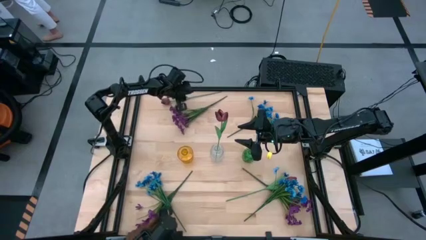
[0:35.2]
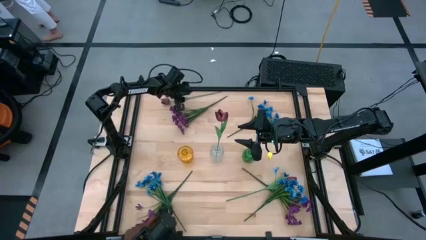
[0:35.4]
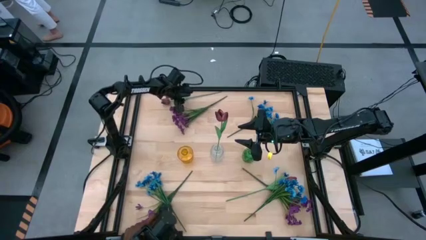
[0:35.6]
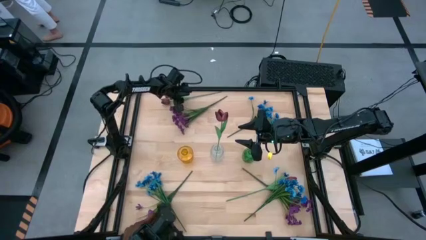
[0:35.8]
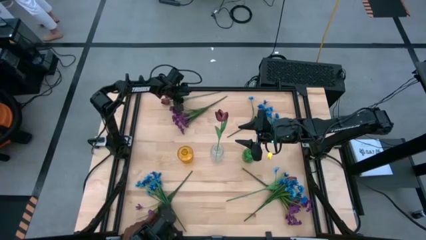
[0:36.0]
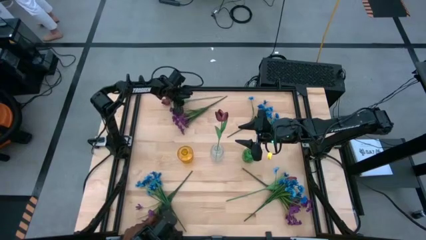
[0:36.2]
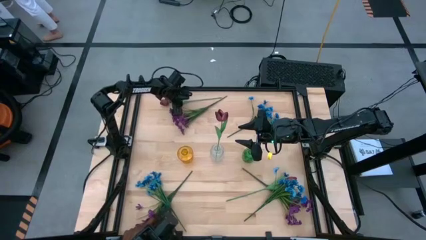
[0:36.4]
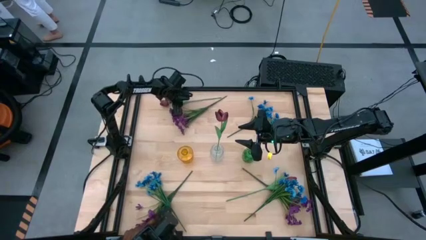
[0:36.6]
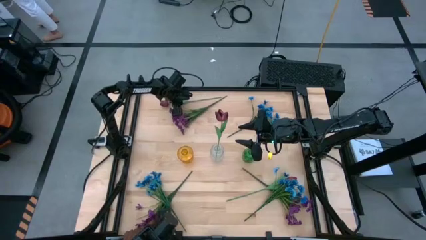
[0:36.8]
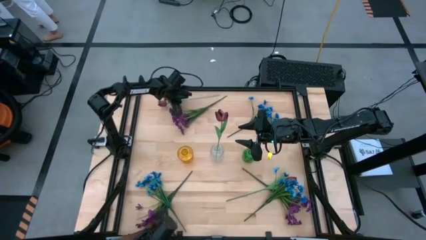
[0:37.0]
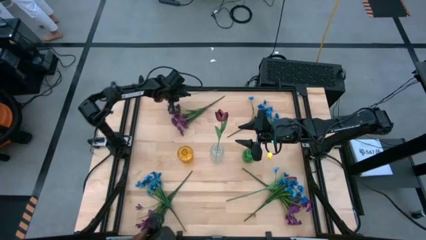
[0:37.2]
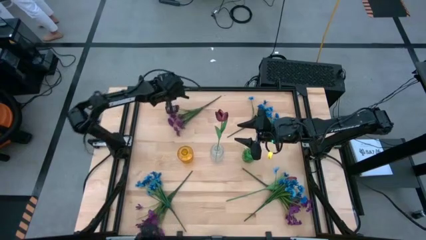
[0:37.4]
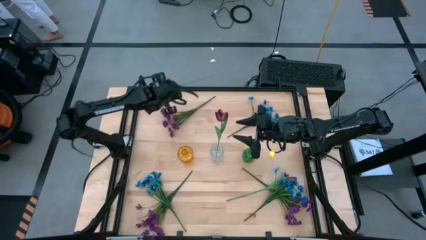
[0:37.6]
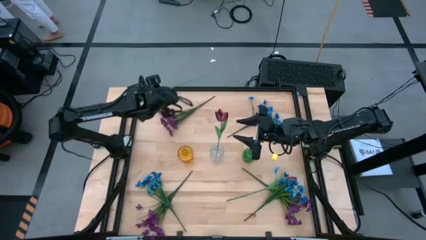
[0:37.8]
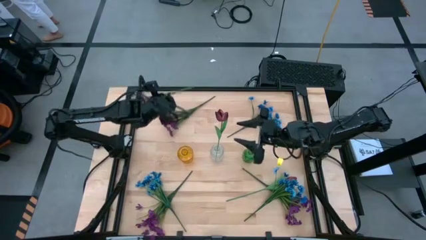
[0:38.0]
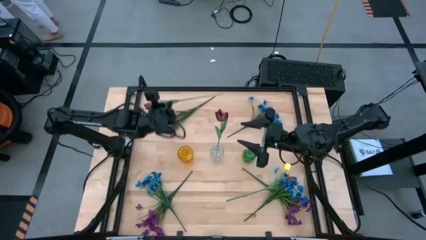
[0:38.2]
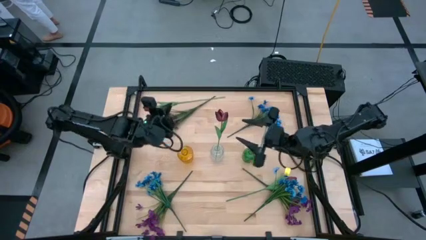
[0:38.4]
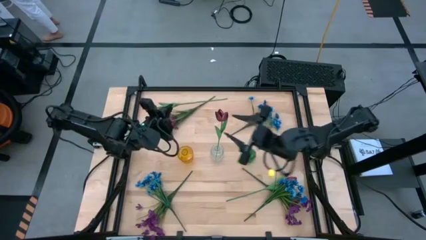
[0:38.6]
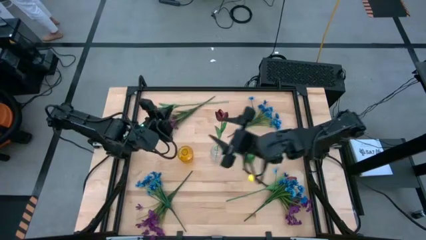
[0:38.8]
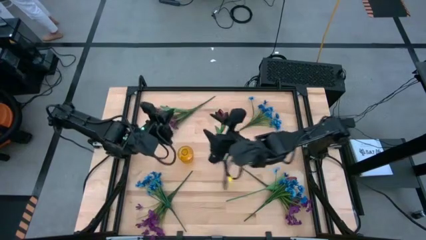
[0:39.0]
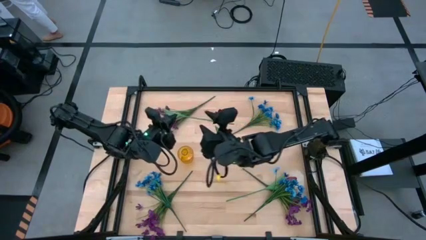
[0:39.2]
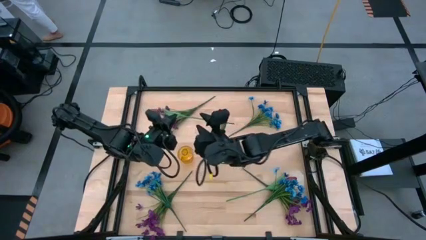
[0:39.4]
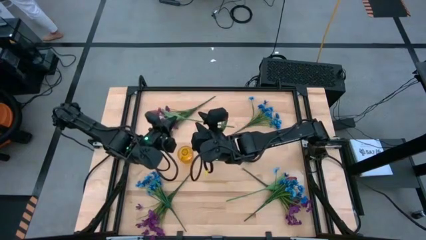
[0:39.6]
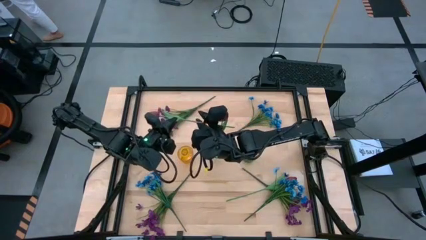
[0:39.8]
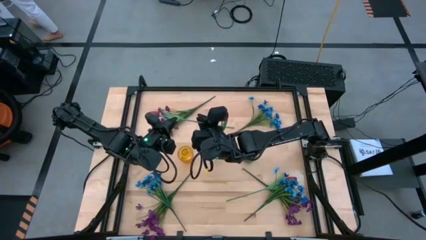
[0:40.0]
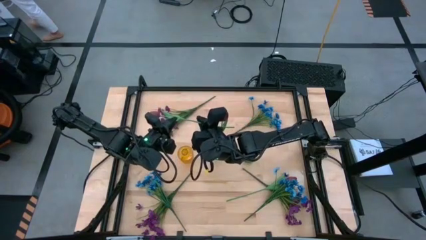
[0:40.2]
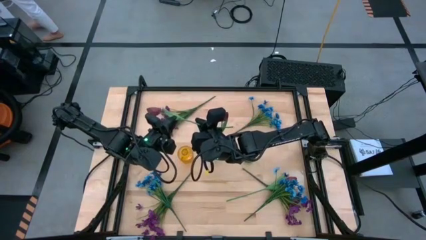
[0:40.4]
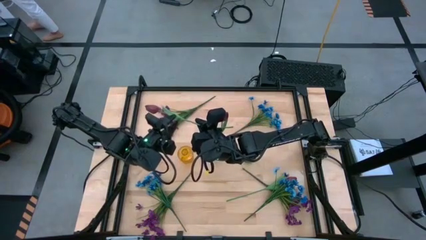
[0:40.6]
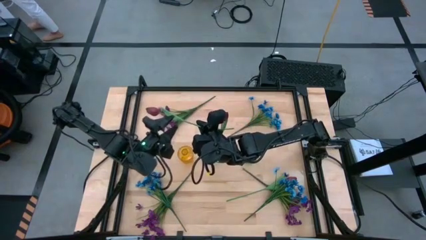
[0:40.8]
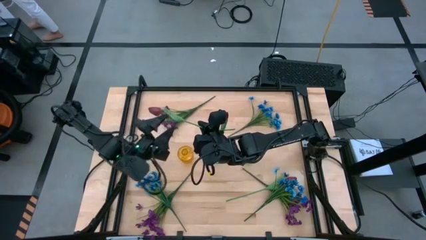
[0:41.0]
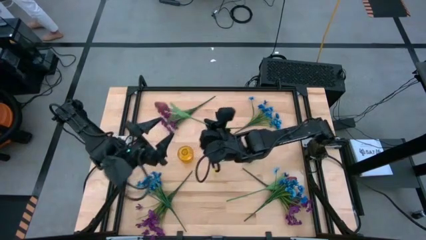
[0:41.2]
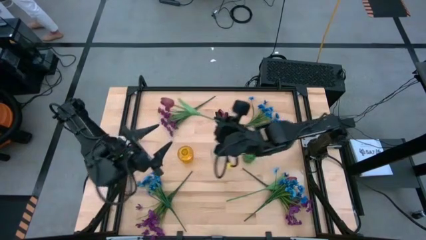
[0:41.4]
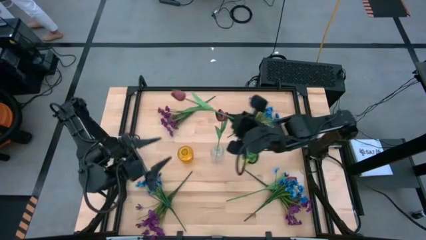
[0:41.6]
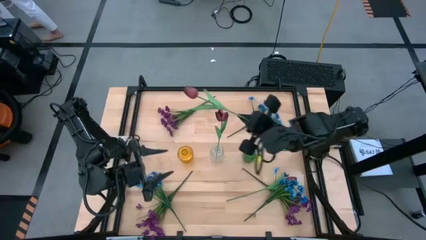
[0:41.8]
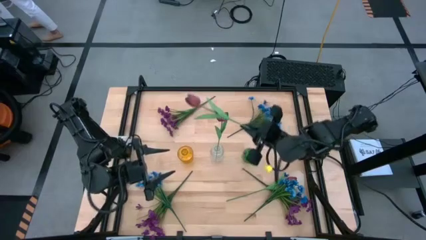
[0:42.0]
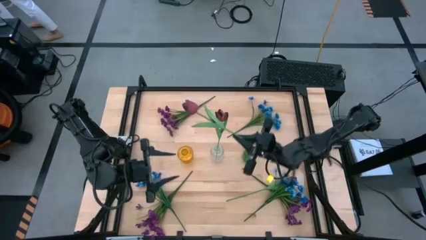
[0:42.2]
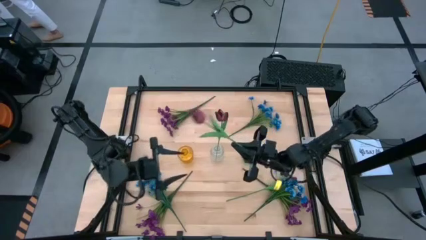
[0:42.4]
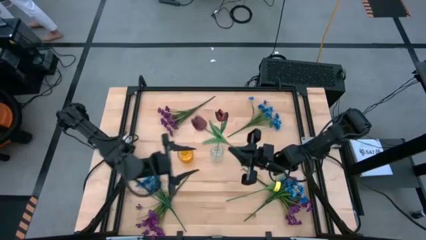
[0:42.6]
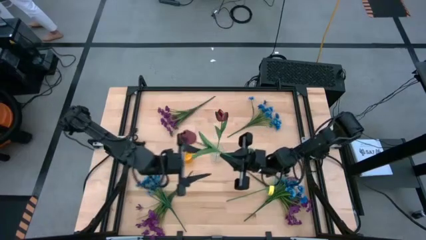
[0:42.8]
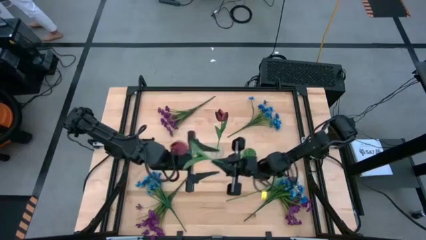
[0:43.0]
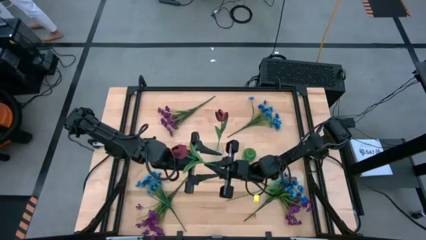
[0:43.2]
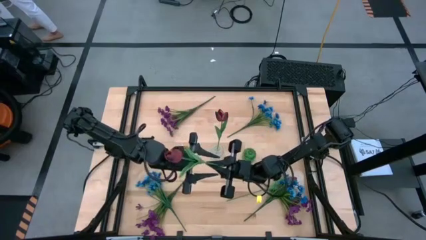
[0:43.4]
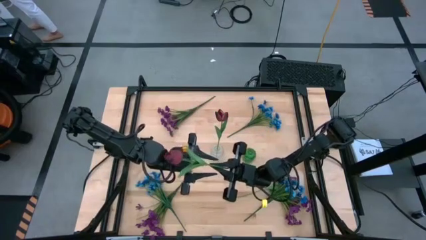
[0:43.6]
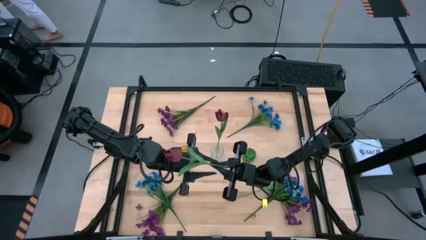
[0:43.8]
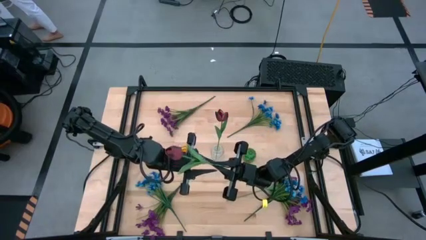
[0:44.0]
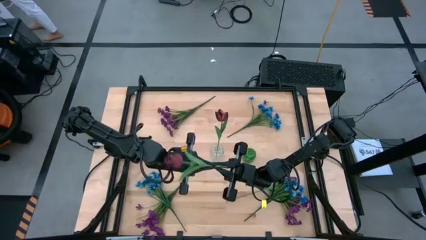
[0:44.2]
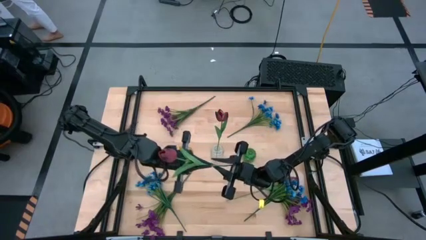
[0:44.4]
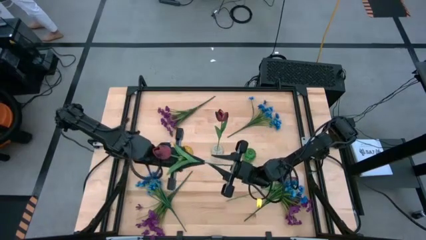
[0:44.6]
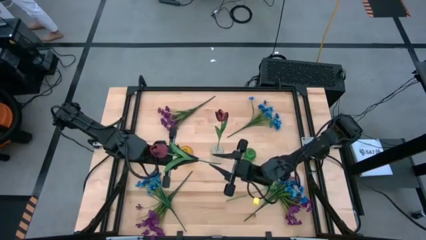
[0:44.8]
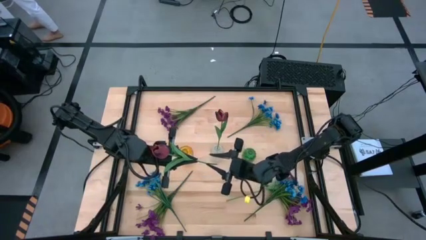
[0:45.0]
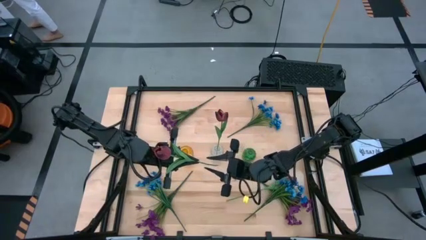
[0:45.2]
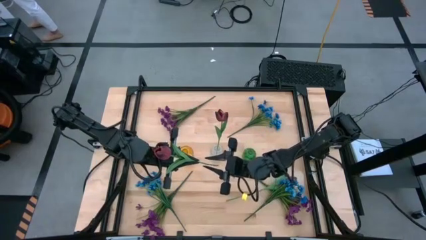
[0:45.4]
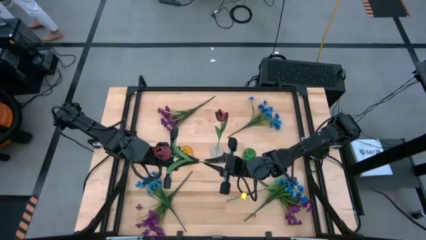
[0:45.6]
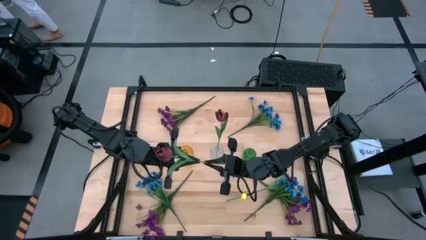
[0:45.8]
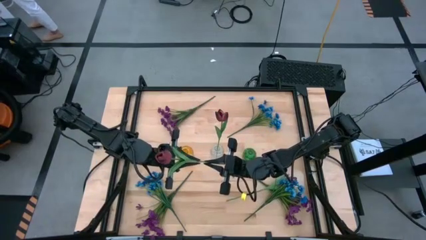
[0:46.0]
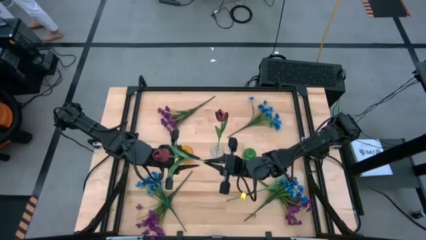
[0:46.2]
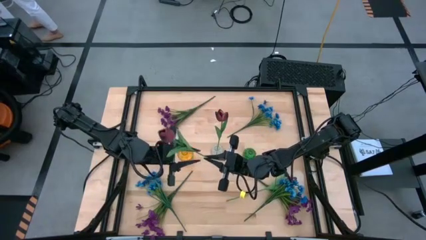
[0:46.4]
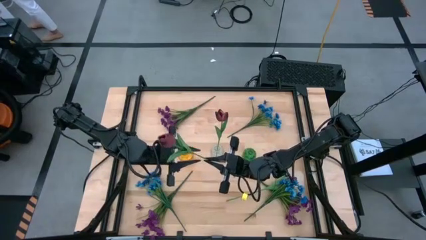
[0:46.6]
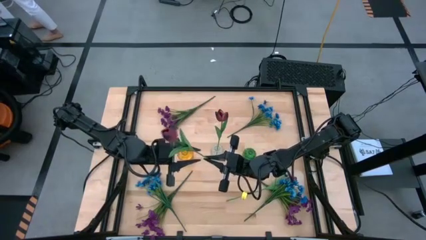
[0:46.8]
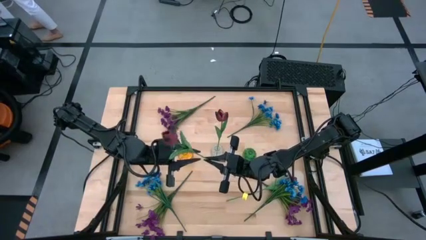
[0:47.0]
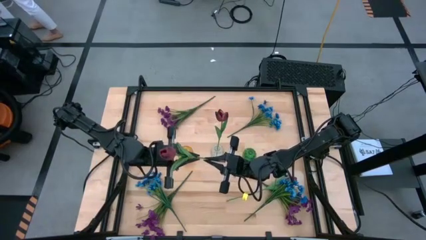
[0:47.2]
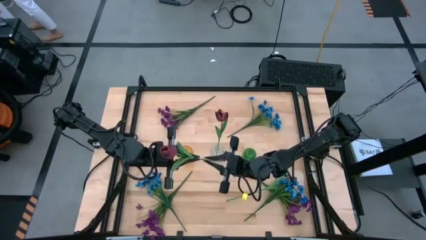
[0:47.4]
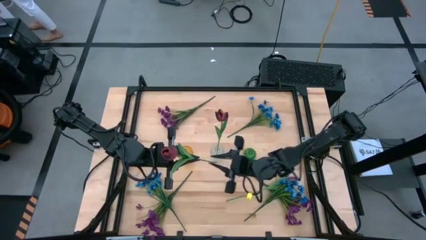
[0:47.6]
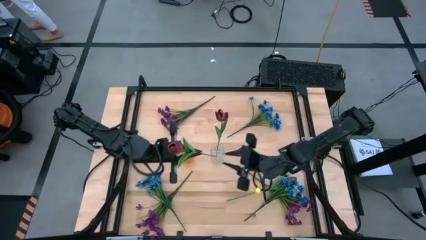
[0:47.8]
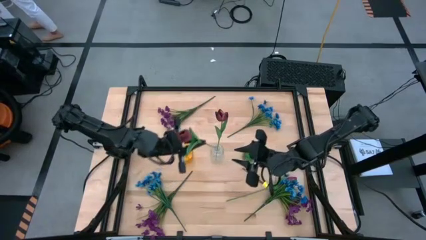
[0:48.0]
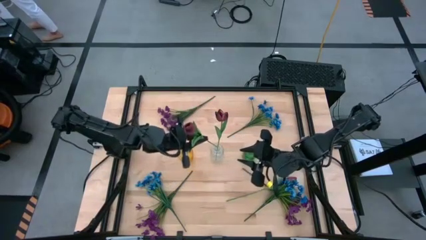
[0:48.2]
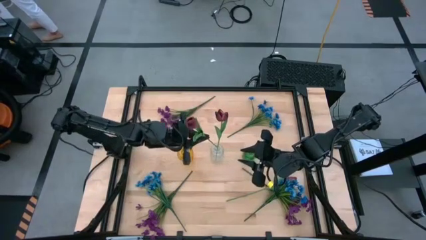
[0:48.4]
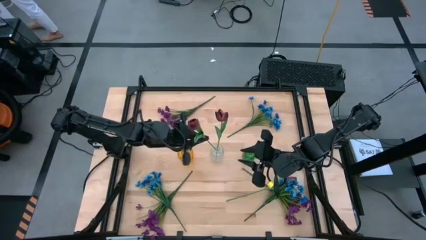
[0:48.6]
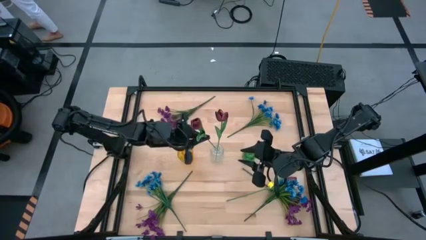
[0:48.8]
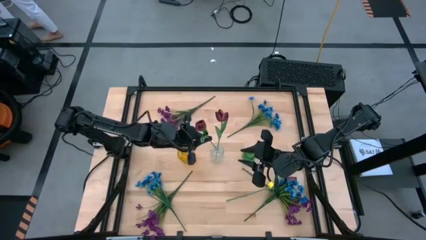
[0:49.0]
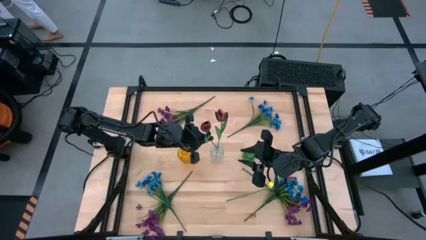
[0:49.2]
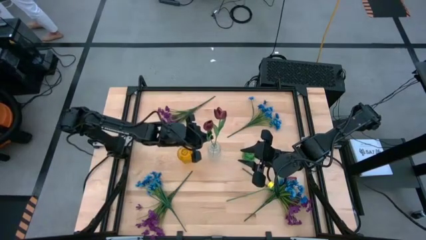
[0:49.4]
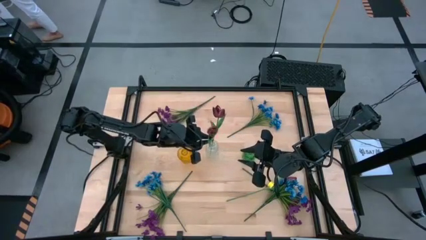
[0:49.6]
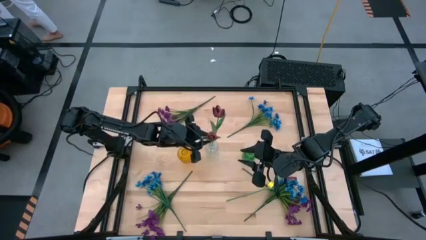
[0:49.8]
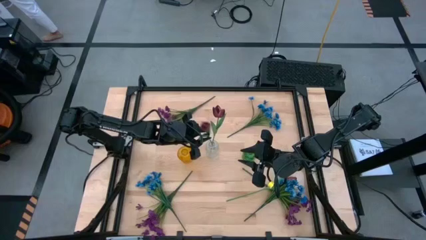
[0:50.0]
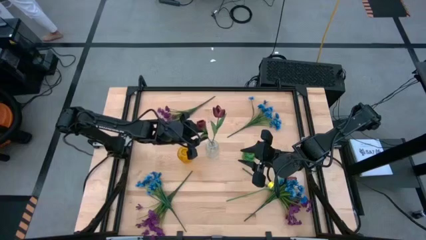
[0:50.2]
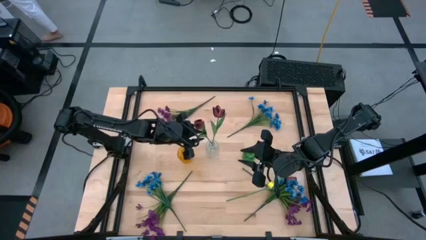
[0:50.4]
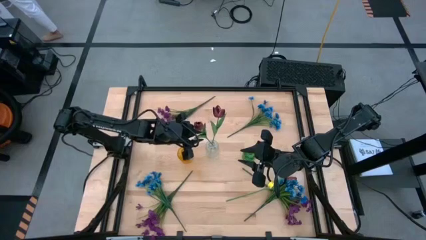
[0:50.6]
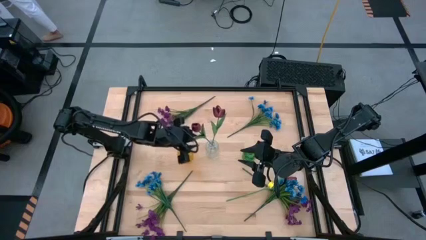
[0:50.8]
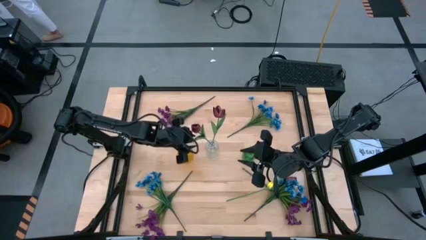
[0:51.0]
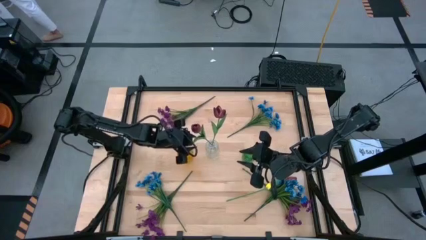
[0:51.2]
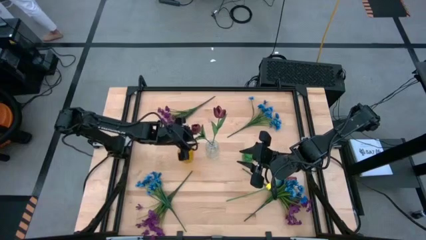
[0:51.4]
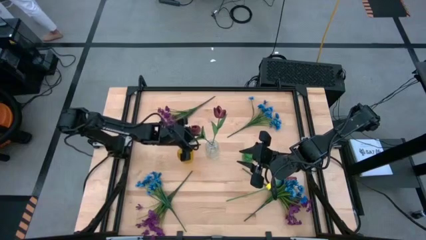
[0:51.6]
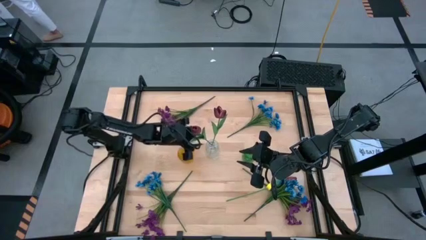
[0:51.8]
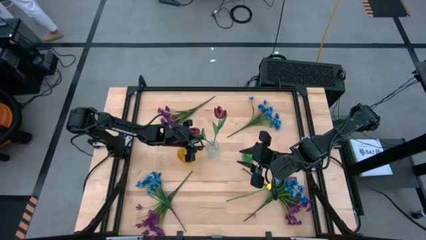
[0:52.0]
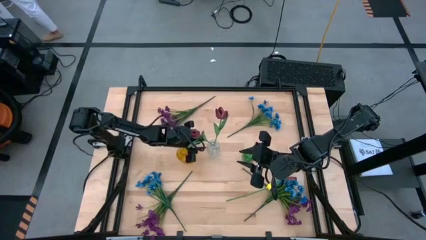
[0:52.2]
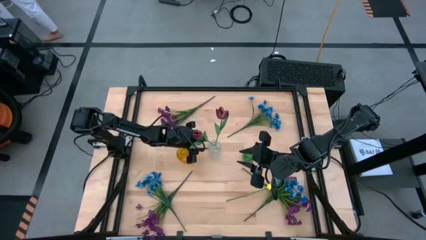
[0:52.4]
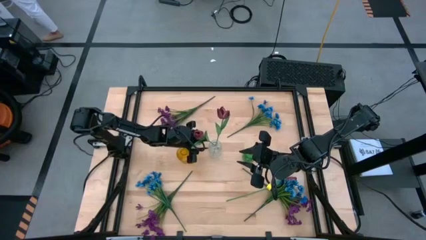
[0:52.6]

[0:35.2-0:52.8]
Task: Sort flowers into vase by color
Put the top red tulip into the transparent vase
